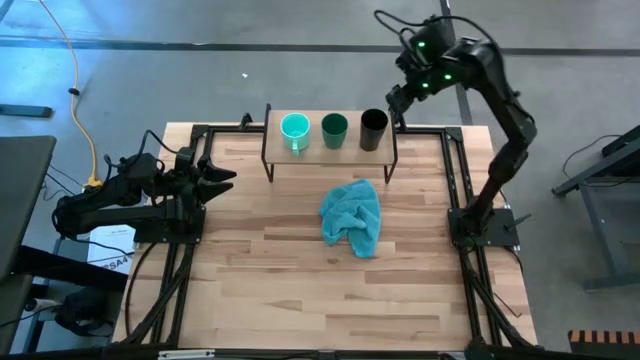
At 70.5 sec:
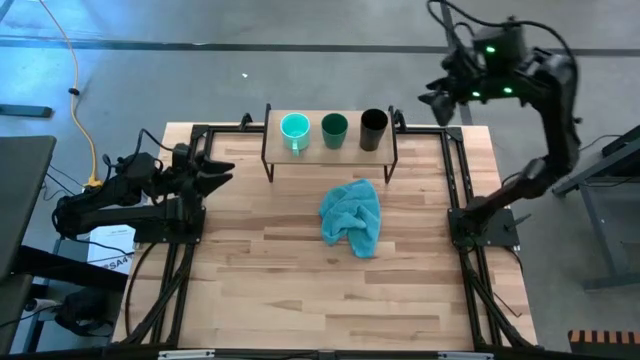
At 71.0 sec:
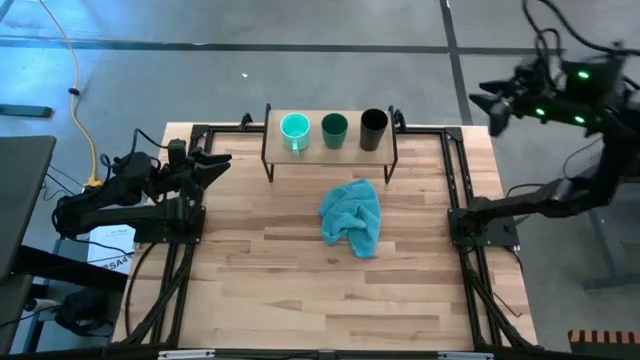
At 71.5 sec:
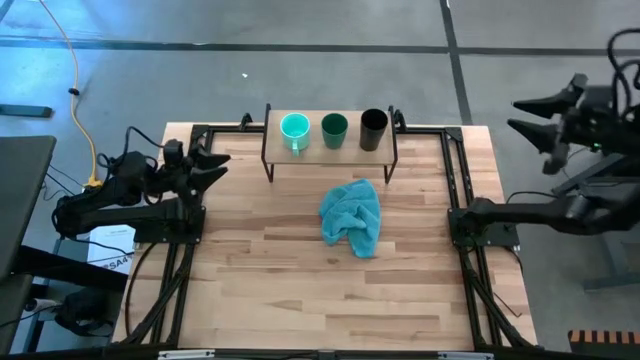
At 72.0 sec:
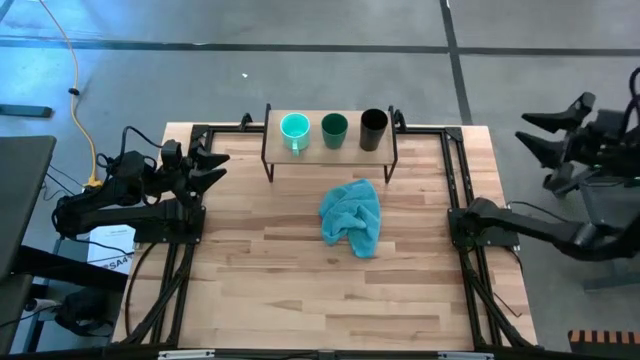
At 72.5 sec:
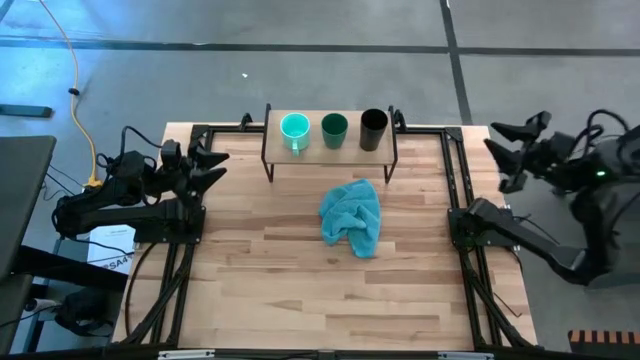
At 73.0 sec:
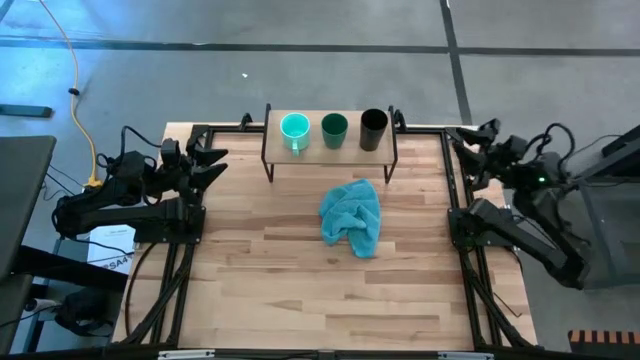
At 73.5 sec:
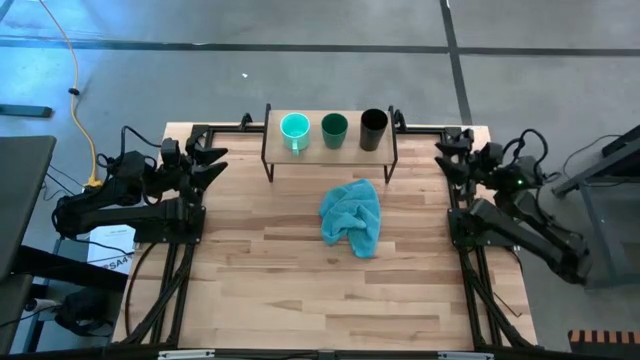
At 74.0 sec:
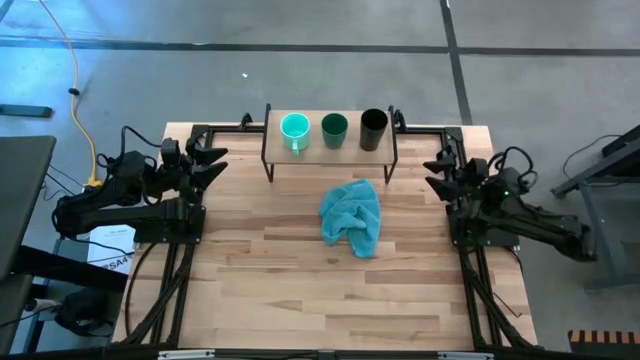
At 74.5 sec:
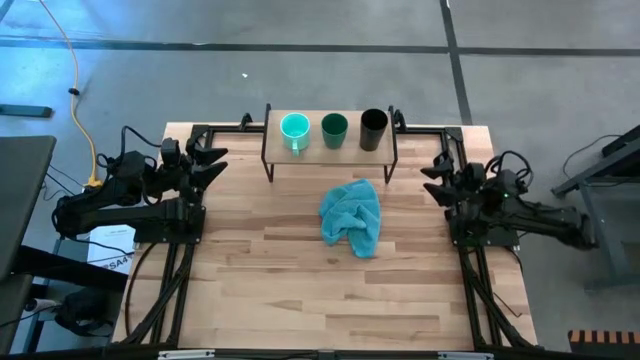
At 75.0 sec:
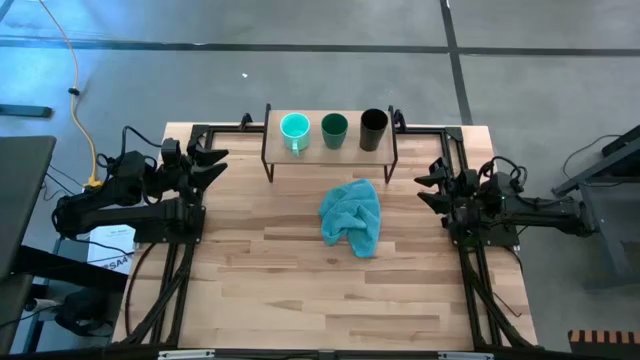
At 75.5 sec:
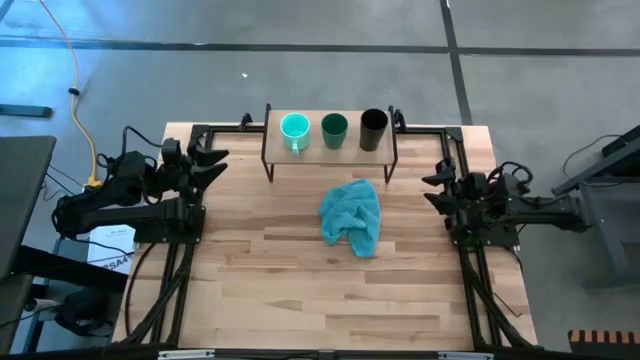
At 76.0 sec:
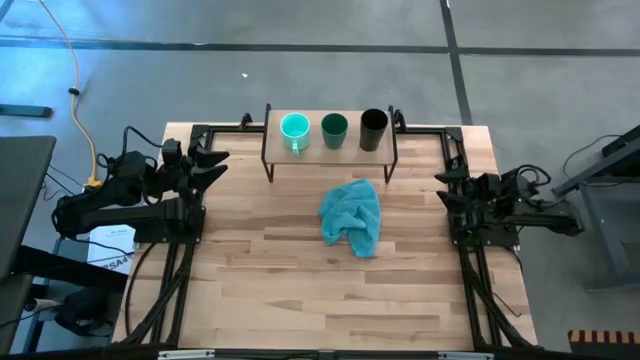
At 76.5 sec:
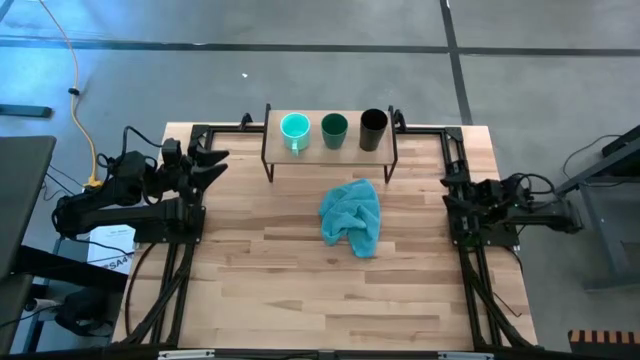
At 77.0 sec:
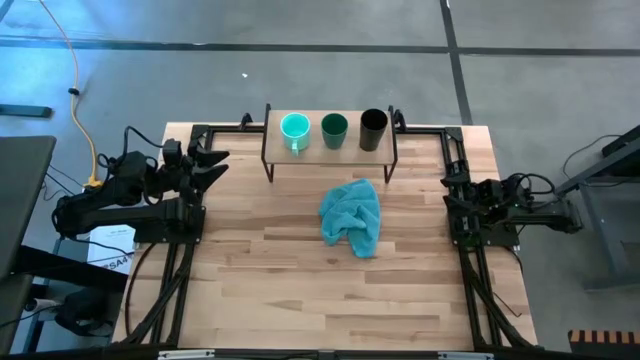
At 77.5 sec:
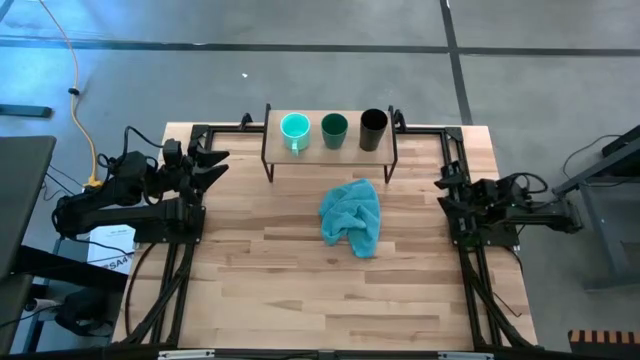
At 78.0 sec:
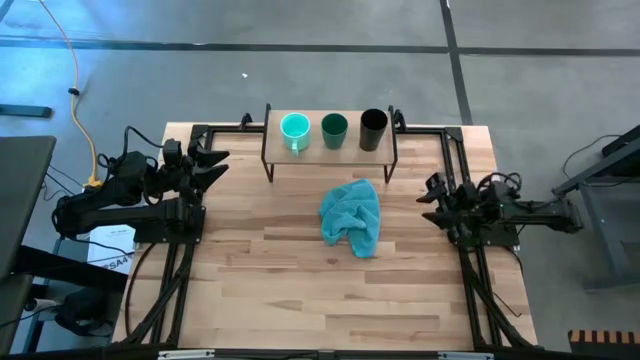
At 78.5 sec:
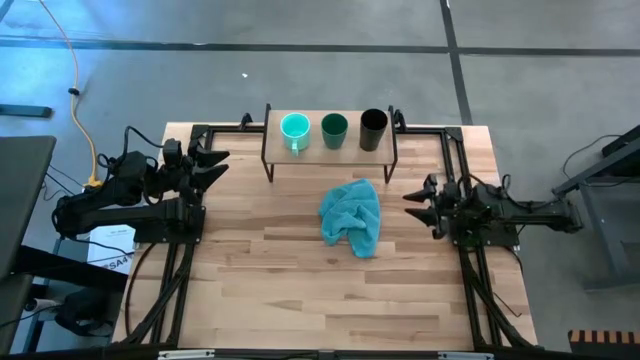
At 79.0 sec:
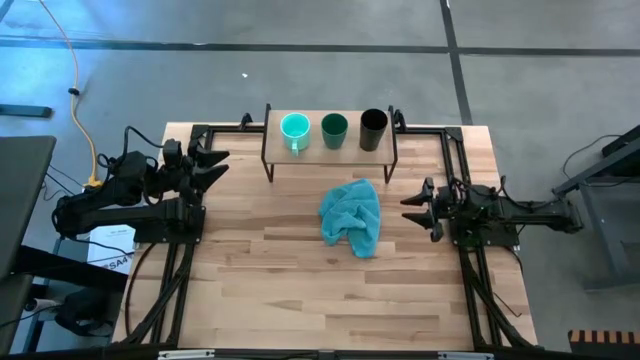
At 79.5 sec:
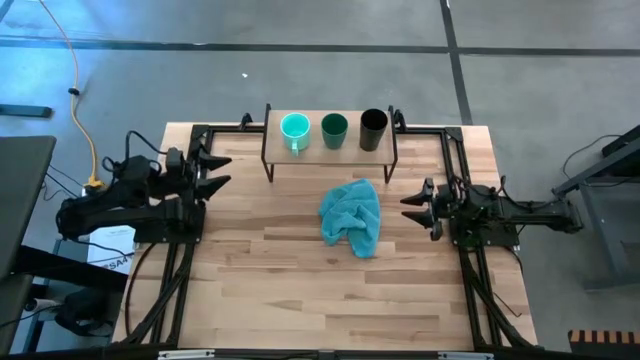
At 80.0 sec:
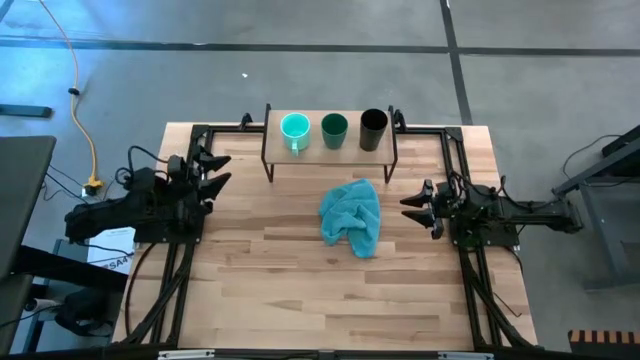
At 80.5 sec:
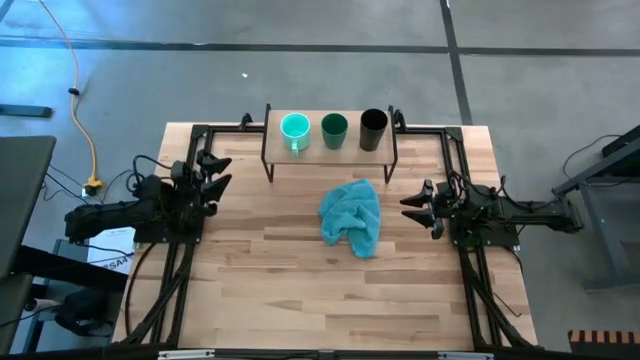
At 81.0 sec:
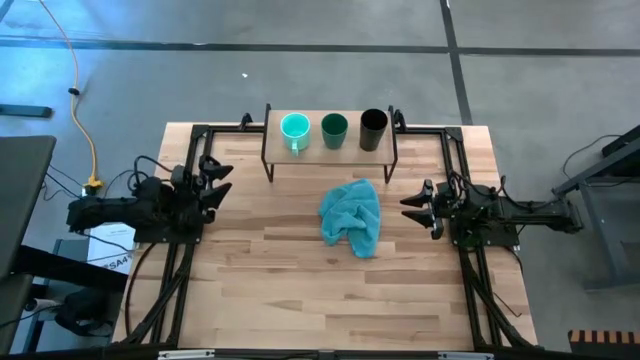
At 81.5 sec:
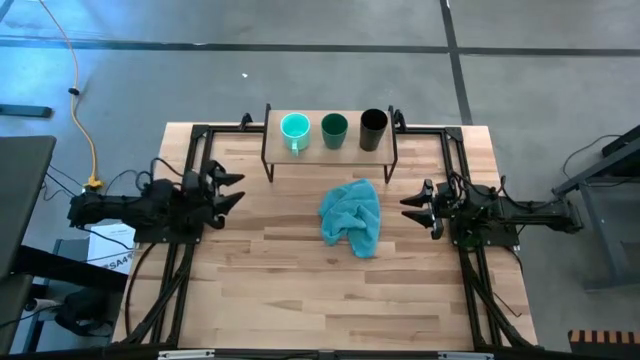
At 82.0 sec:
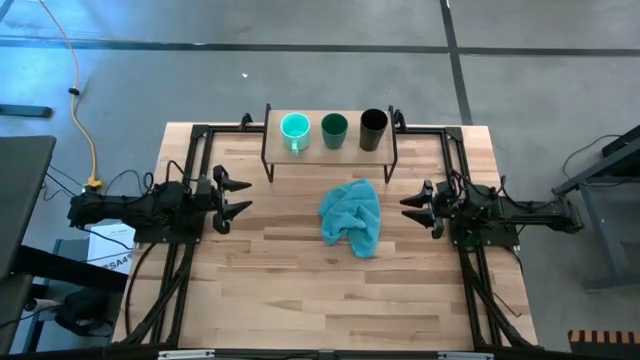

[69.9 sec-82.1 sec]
Task: Stack small to large cups/mugs on shelf
Return to Home Position

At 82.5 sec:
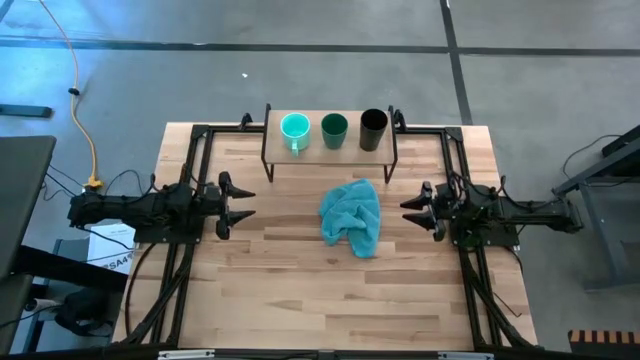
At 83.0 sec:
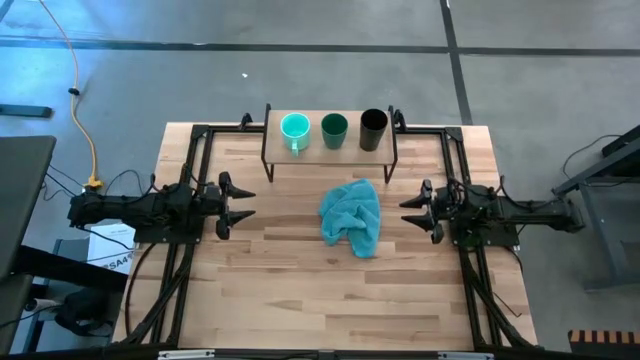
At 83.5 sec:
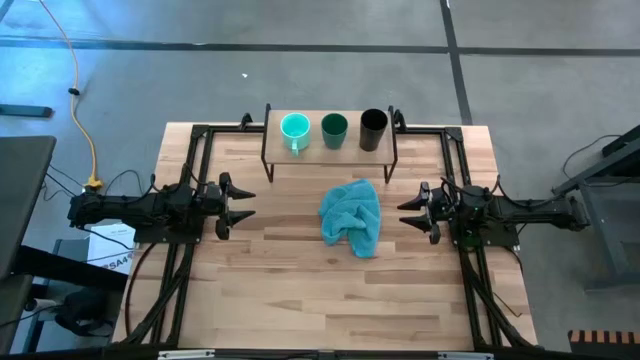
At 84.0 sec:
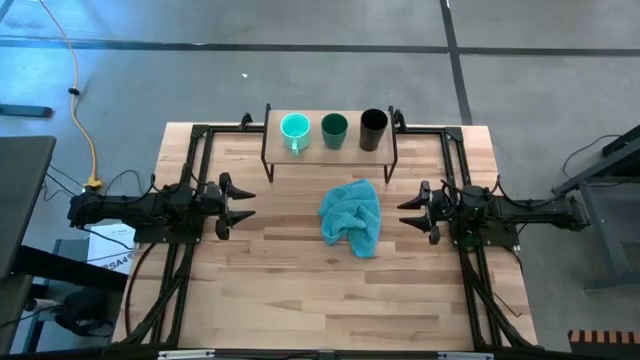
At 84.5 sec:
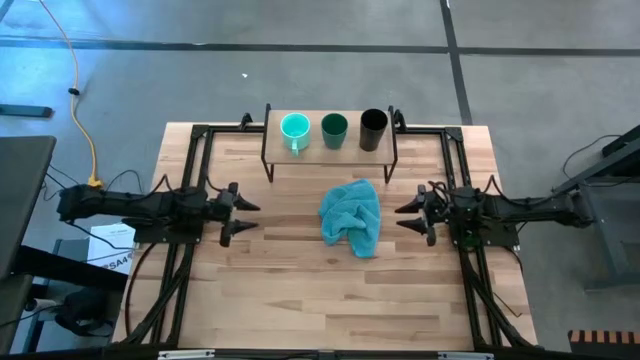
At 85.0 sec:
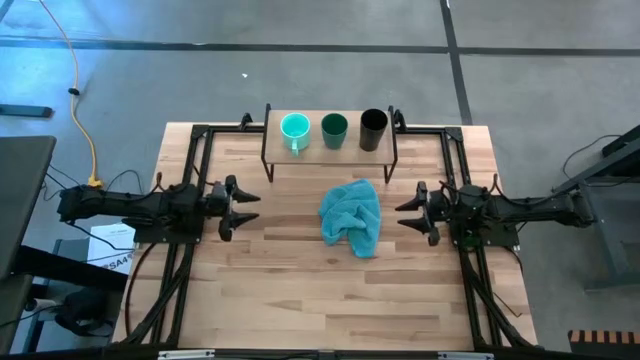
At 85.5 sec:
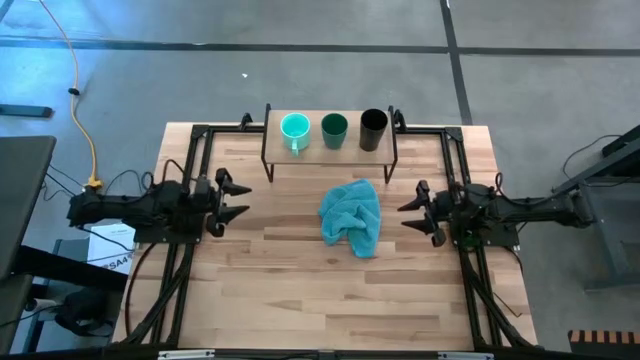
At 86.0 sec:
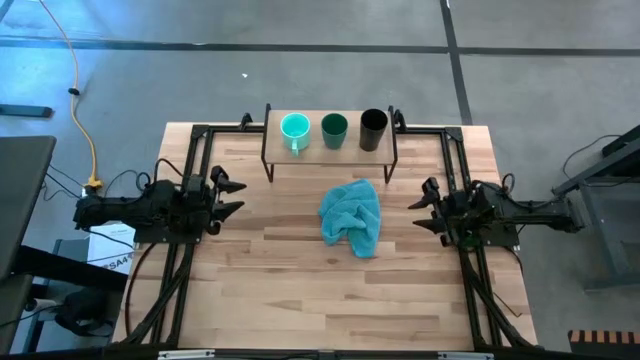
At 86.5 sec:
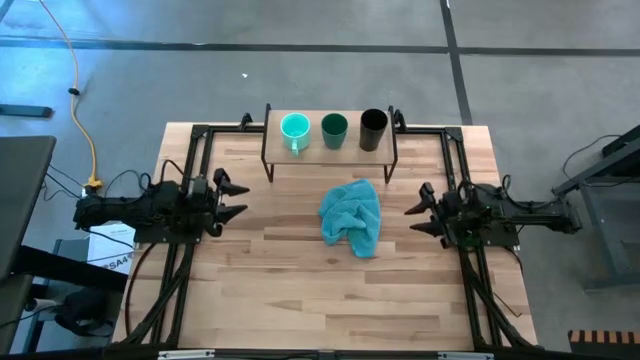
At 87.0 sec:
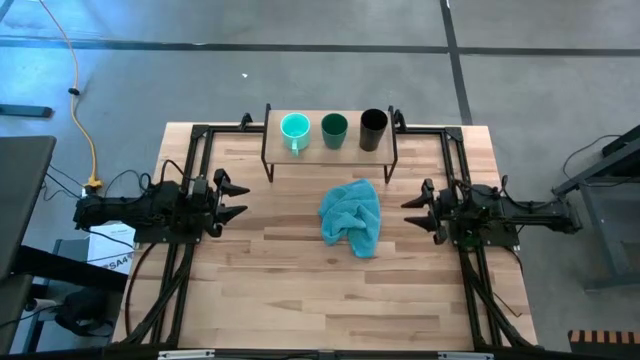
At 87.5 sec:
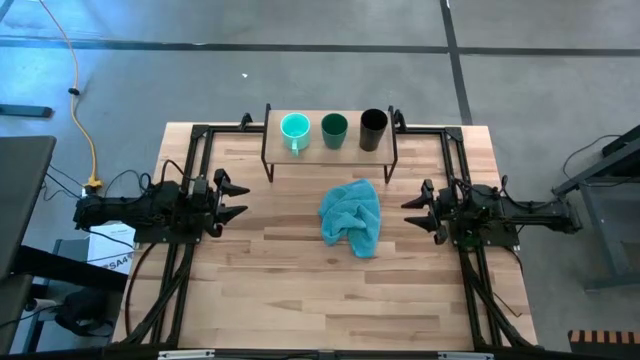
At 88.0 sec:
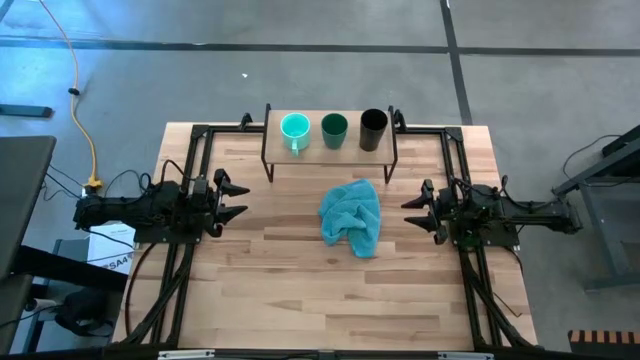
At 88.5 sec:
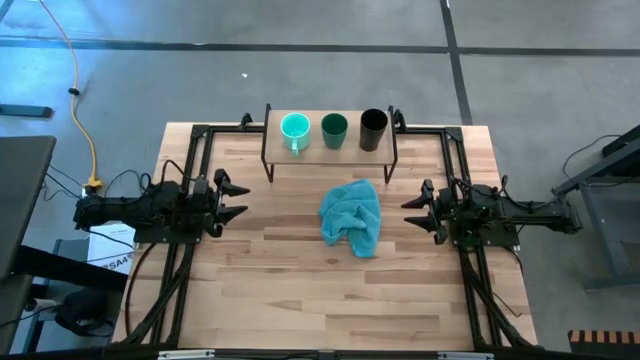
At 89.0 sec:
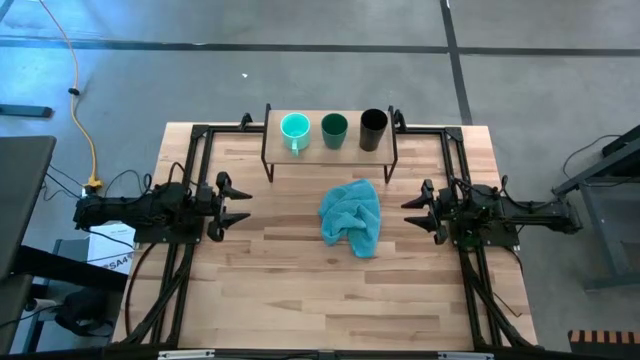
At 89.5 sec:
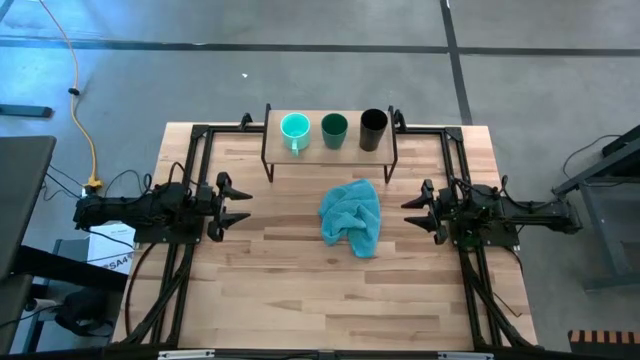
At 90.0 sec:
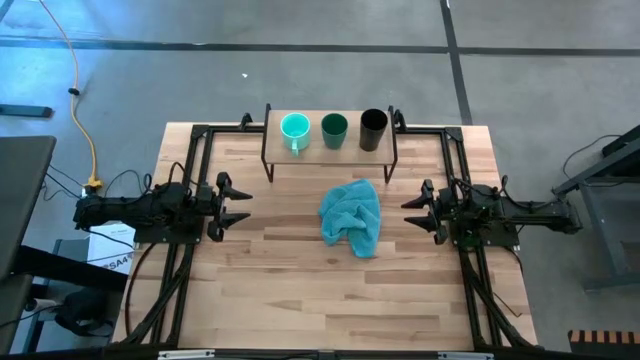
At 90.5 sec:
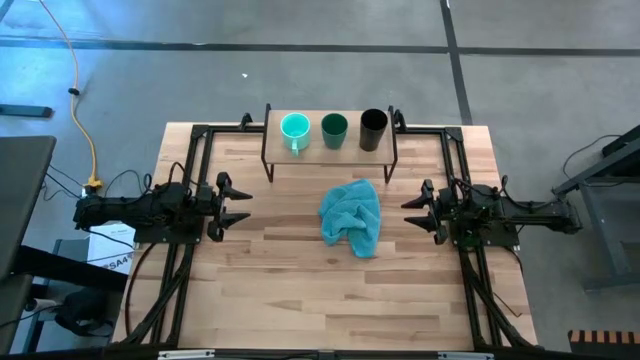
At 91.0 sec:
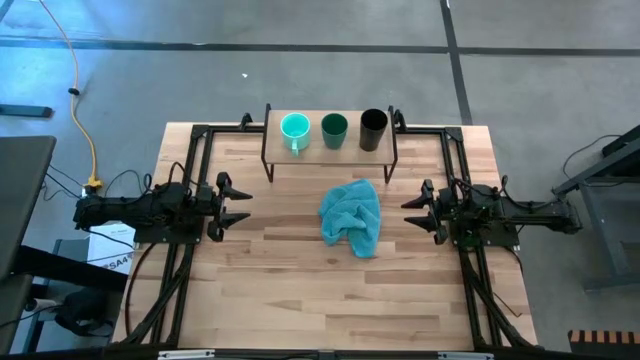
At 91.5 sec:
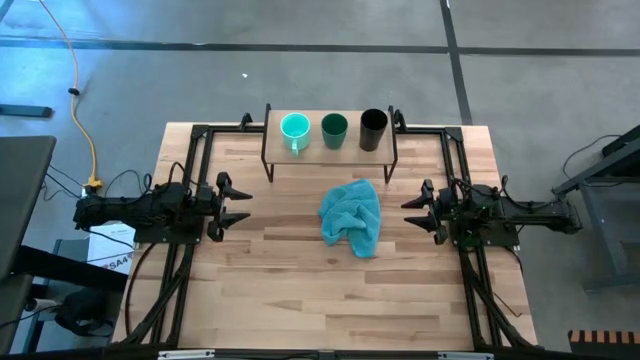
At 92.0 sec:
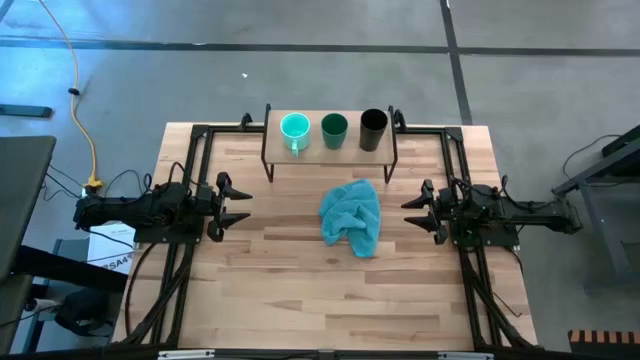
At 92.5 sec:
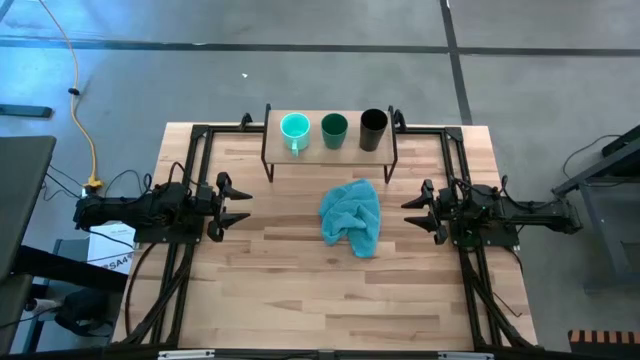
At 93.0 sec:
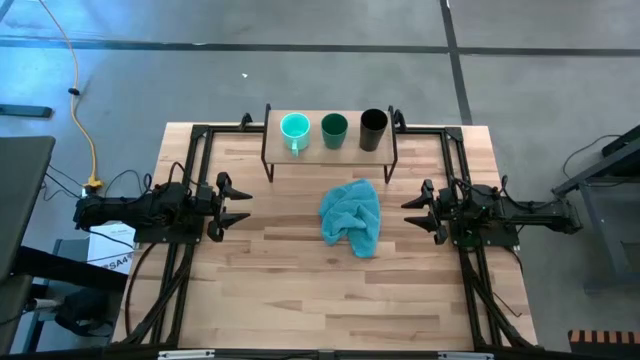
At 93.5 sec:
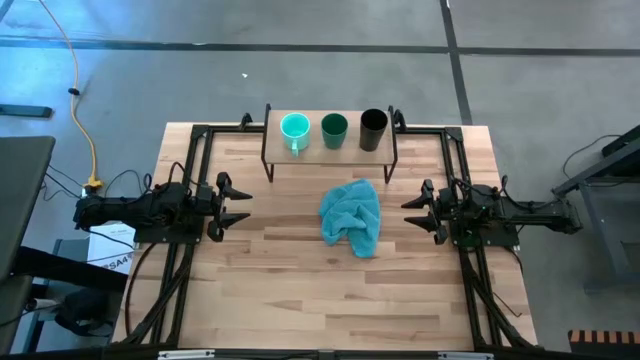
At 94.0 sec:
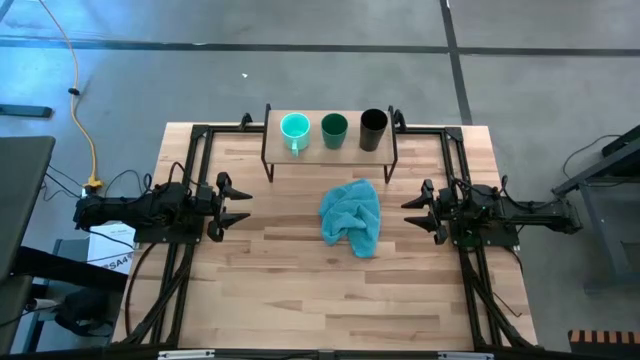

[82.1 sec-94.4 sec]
Return to Home Position
